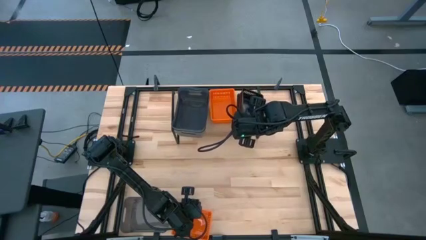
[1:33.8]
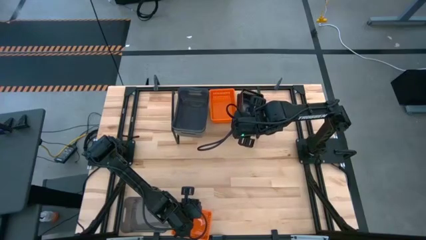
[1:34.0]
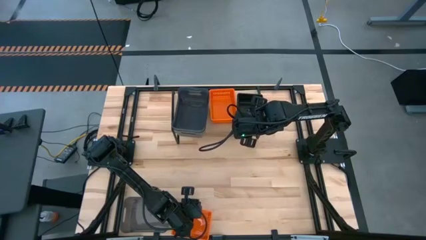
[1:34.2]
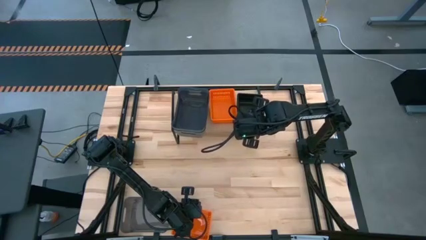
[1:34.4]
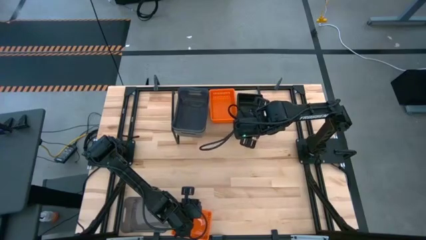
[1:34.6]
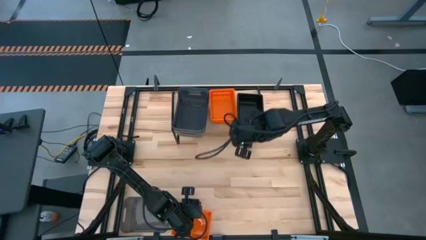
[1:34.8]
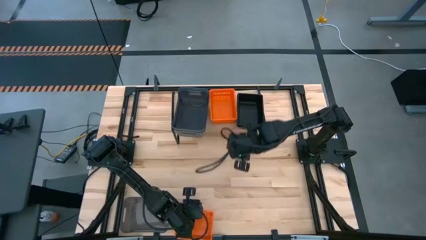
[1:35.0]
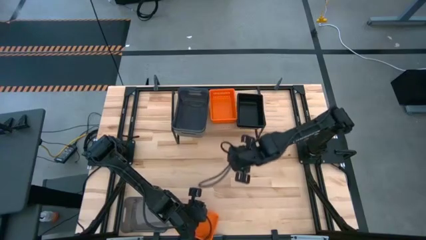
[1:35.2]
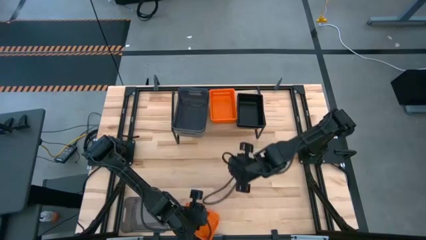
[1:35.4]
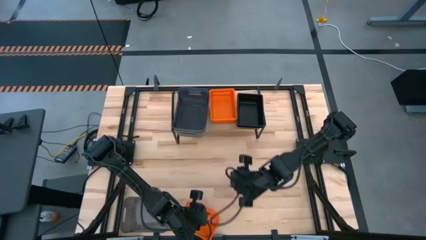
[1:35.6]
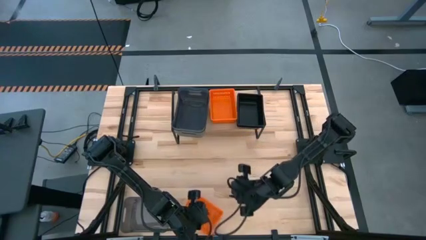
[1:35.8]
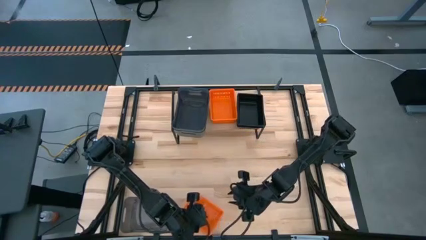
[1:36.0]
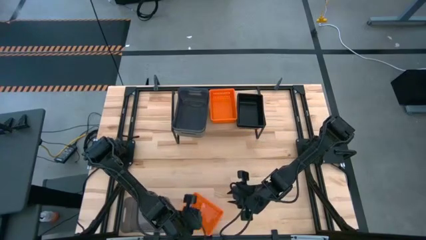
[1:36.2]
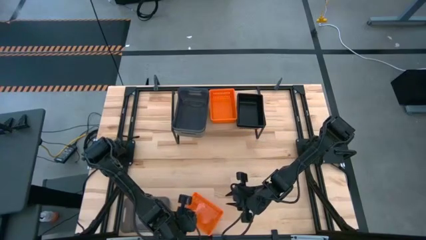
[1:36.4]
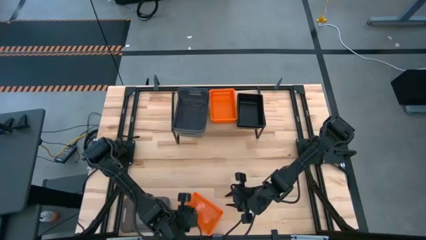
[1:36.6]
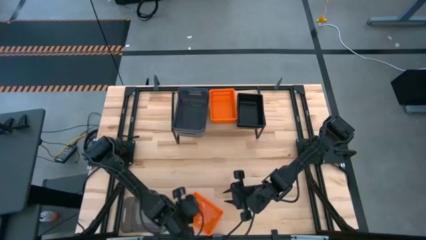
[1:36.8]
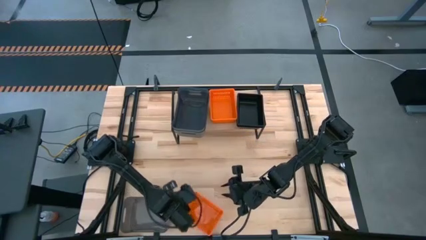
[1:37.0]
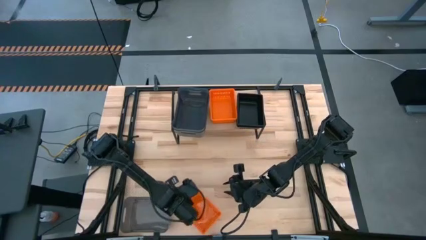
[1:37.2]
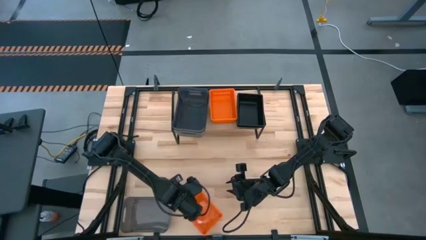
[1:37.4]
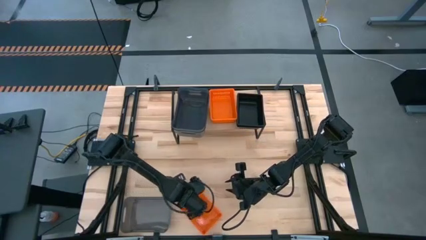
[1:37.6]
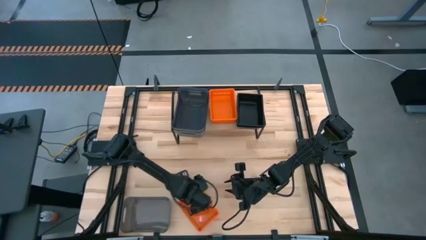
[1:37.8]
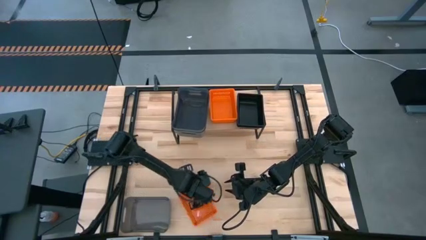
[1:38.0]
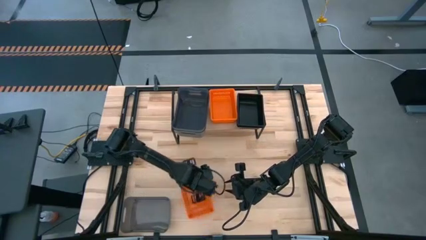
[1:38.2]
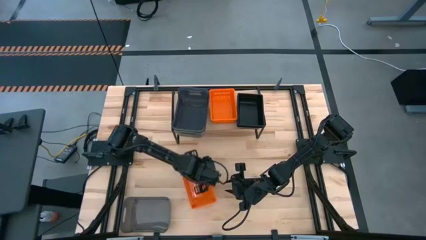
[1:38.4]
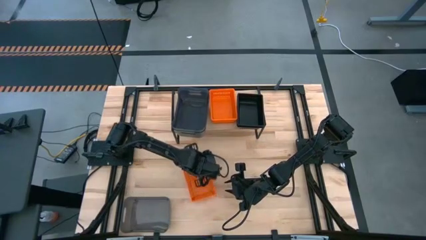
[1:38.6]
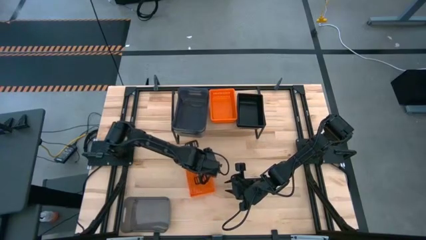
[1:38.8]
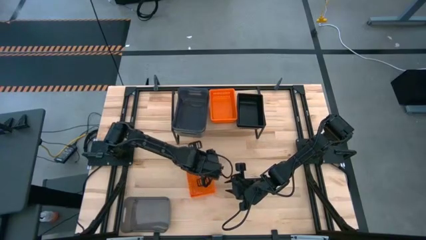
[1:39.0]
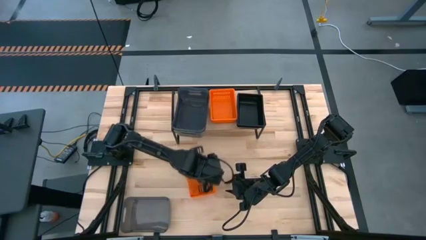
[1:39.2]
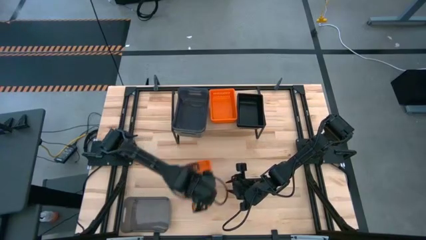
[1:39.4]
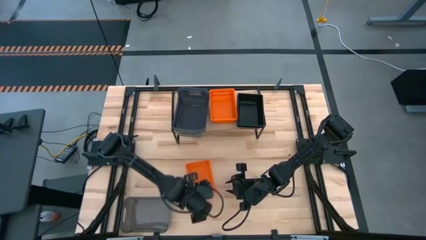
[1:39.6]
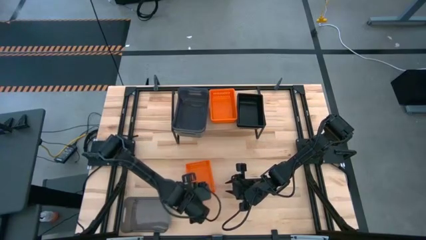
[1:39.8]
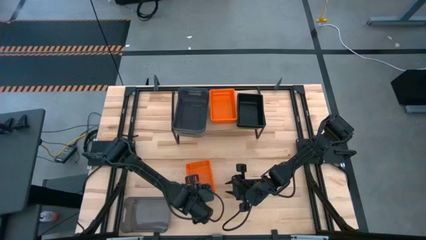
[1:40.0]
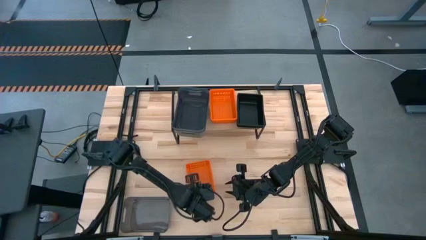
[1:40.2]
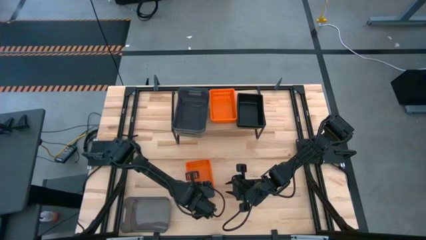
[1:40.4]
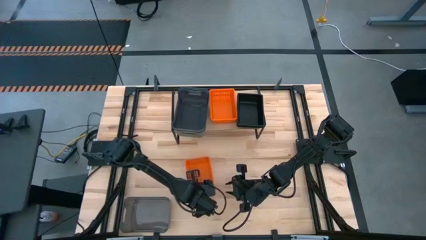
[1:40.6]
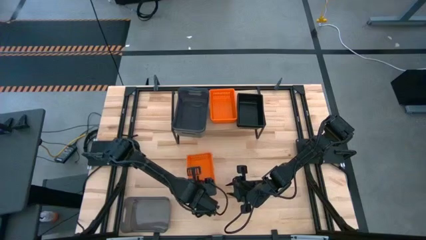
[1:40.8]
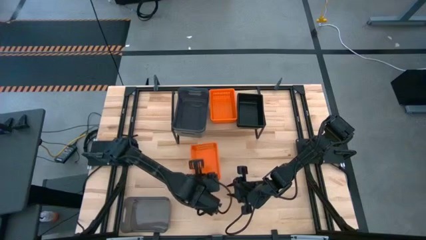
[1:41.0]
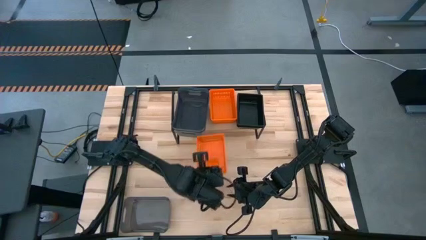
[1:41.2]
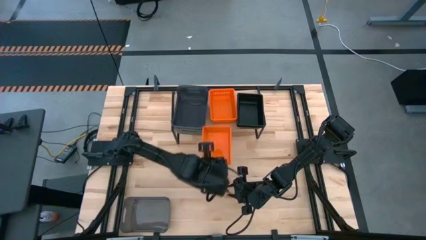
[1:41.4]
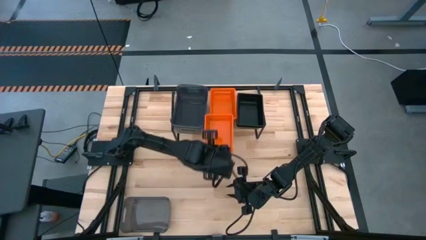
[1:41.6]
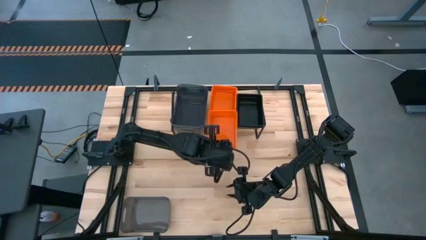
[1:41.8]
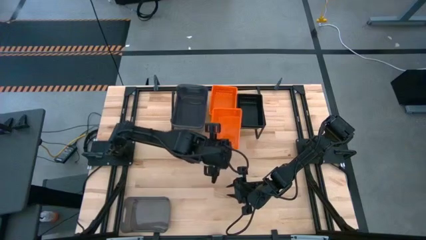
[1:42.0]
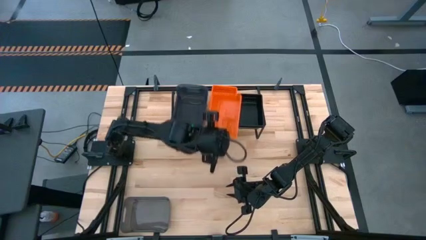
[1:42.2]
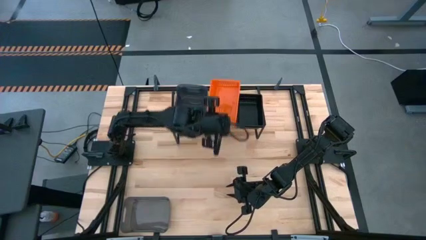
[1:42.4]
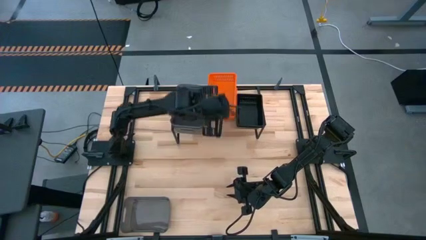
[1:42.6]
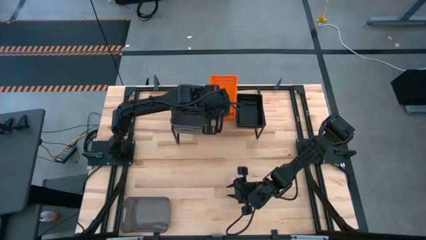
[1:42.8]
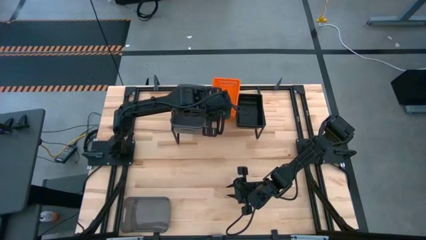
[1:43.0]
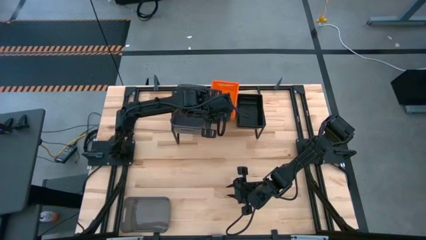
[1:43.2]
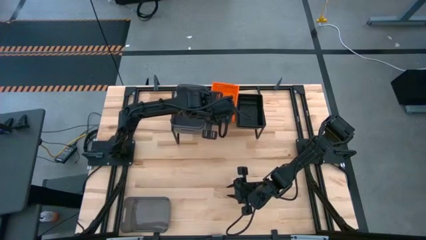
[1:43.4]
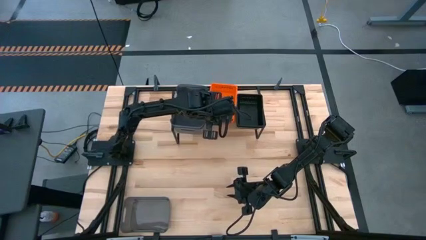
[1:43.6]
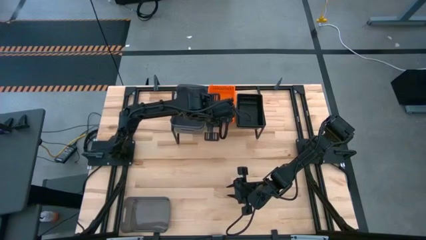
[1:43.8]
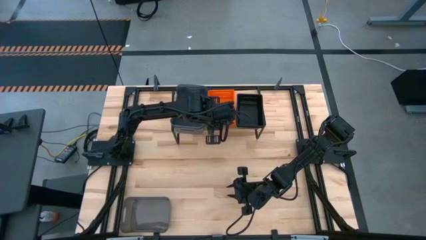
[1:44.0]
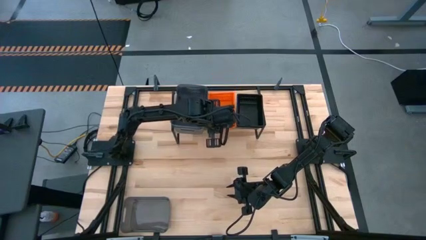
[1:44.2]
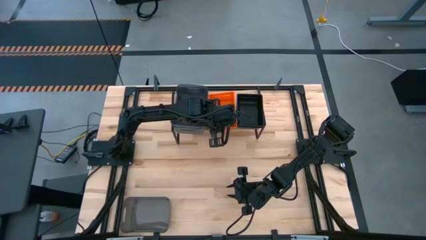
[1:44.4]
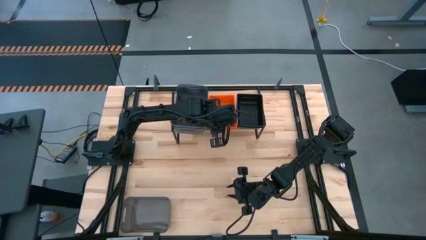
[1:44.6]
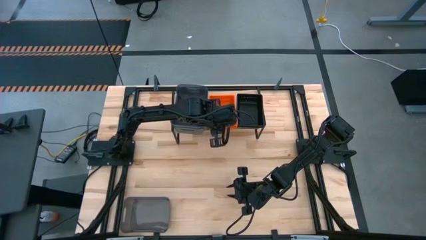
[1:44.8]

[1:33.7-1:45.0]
Task: Stack baskets on shelf by color
Stack the orange bin on the stacked orange bins on the shelf

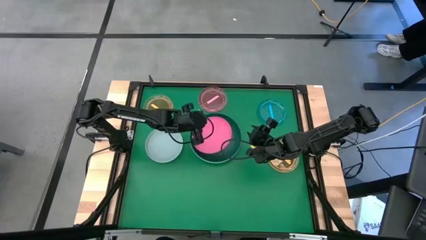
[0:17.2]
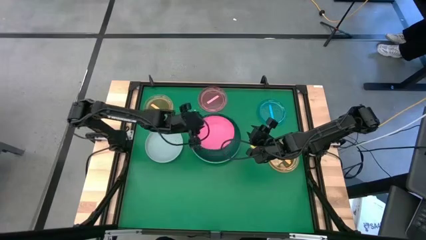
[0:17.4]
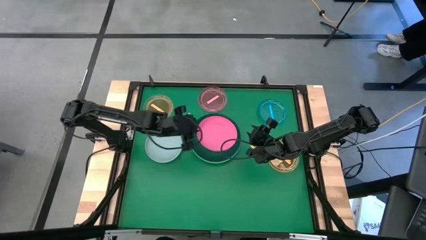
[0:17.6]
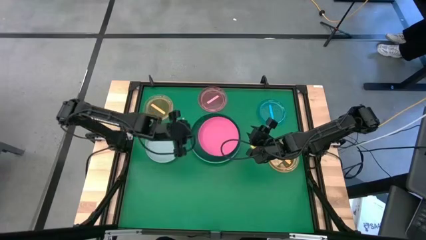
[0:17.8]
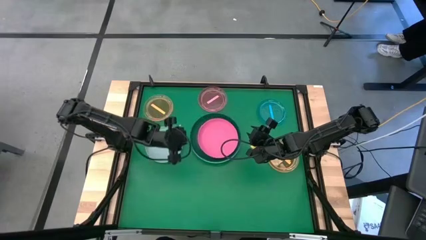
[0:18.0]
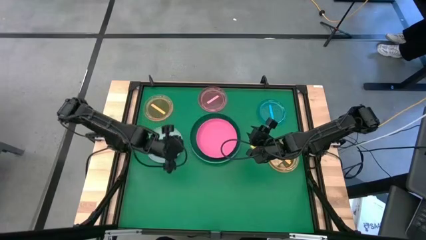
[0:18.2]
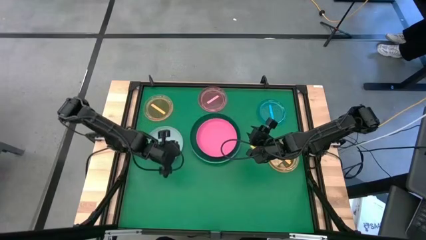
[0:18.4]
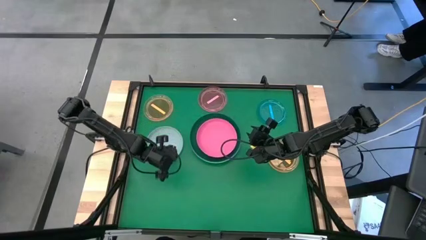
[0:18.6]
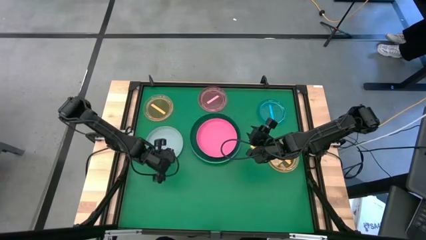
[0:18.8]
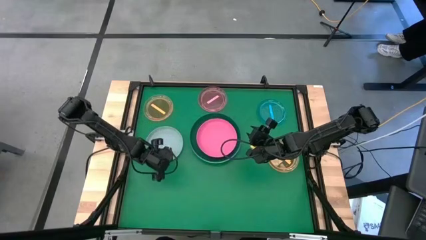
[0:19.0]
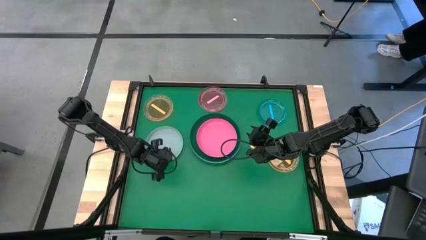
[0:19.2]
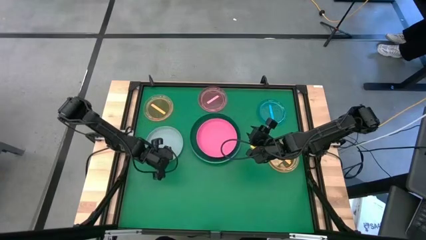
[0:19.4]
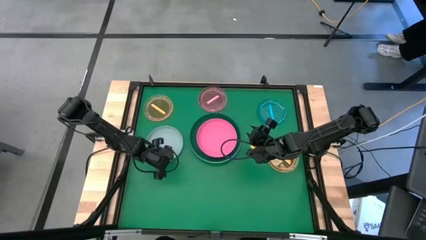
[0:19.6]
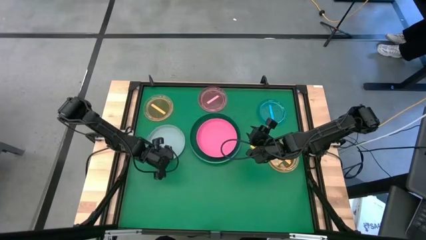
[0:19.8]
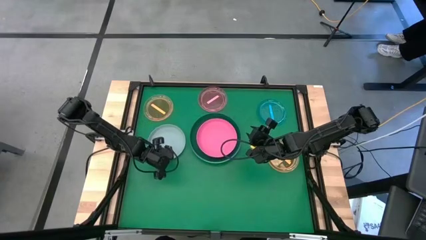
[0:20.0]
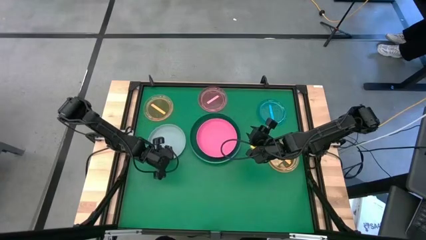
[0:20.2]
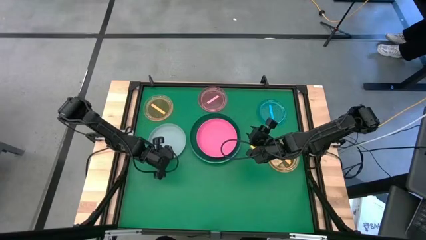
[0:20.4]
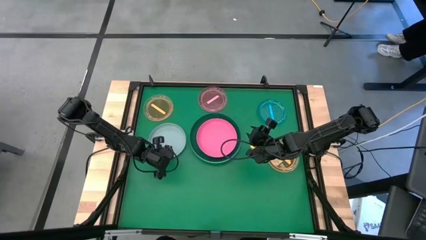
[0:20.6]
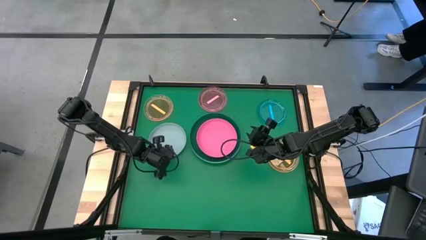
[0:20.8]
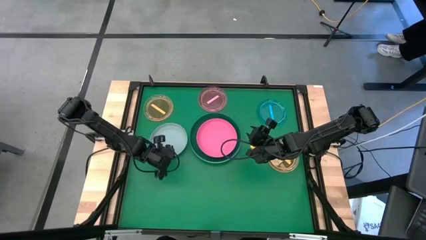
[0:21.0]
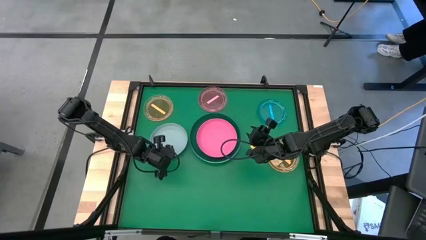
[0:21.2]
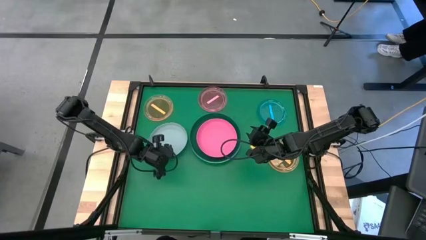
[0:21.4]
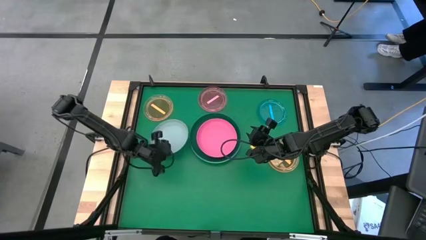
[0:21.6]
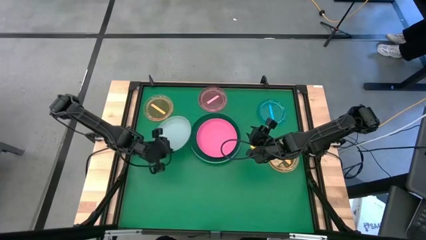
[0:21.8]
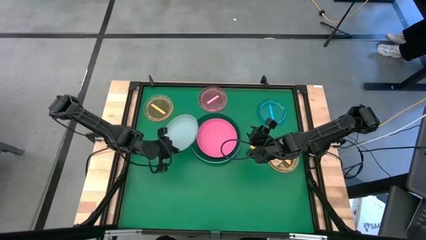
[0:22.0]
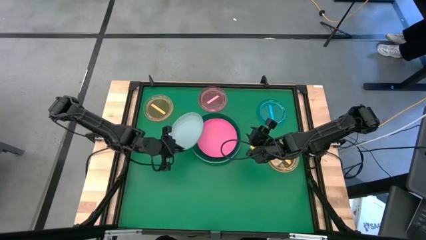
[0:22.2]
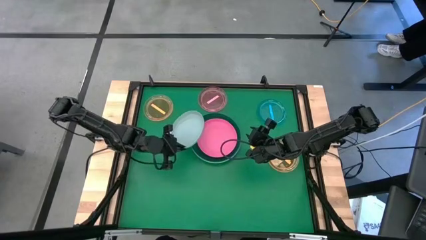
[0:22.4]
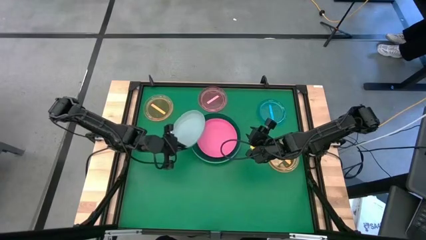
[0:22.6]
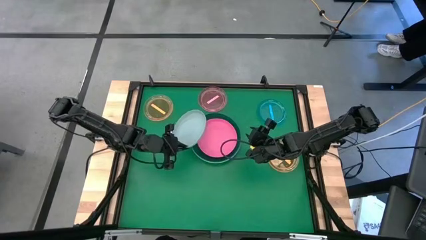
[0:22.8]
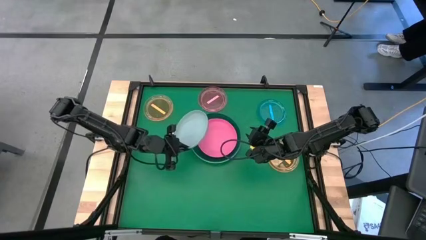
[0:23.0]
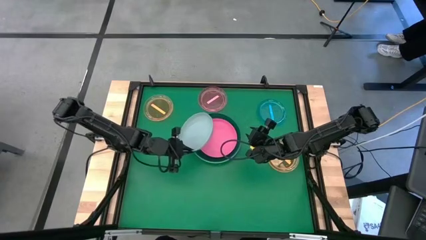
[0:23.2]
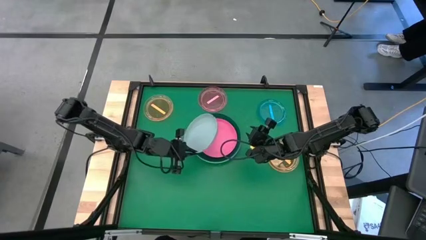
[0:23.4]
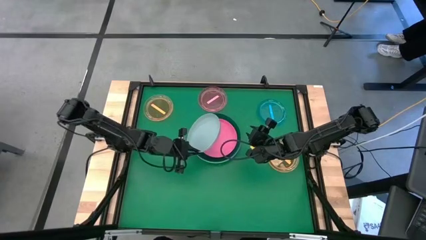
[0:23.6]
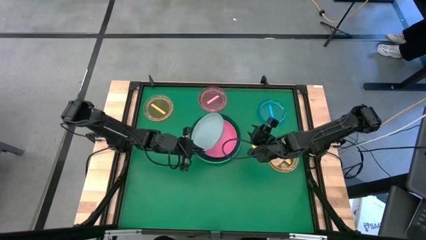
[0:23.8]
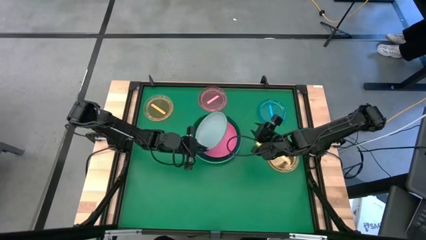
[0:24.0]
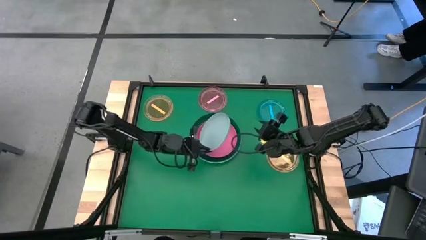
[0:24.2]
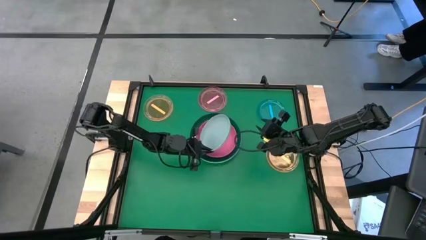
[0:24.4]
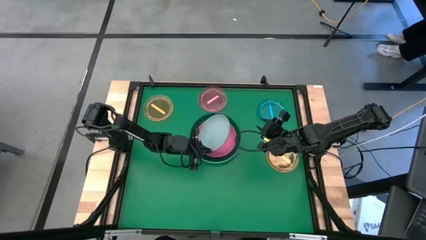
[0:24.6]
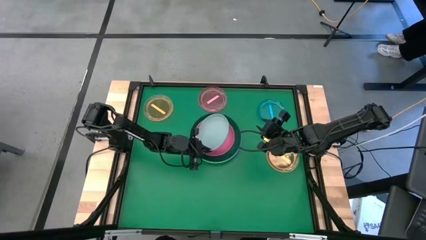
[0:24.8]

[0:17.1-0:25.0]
Task: Stack plastic plates
Stack the gray plate on the pink plate
